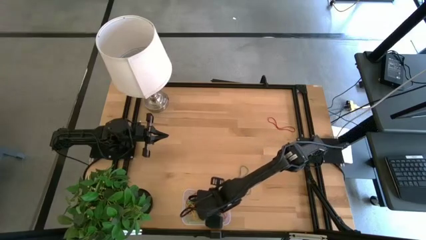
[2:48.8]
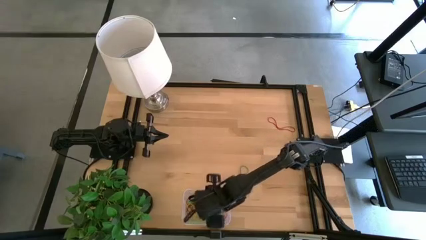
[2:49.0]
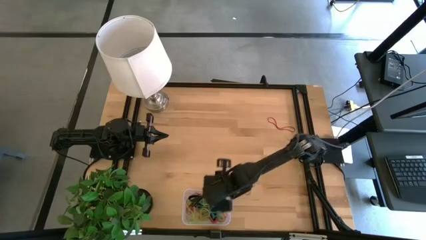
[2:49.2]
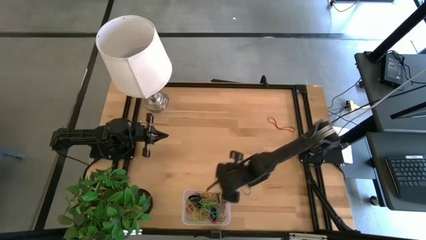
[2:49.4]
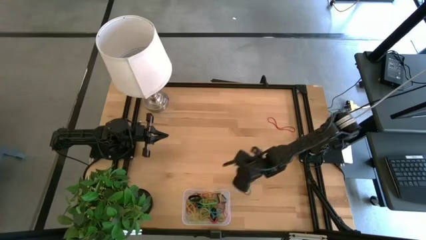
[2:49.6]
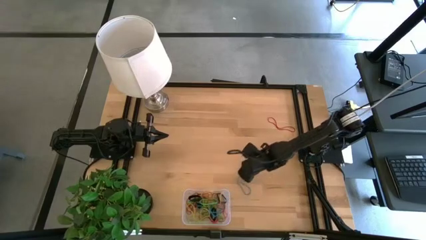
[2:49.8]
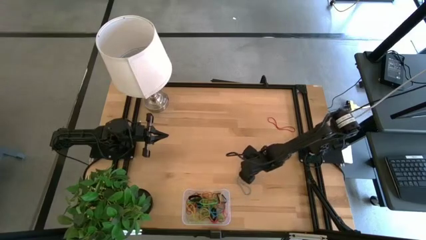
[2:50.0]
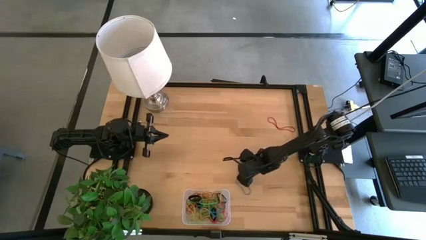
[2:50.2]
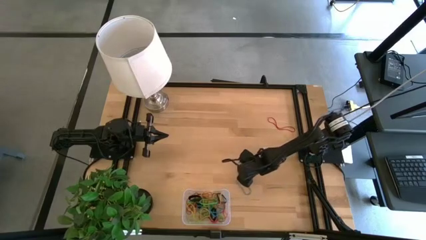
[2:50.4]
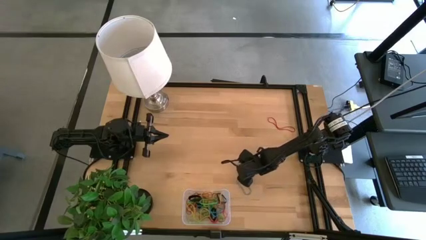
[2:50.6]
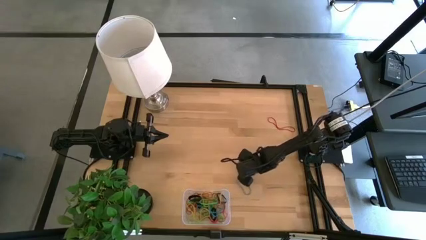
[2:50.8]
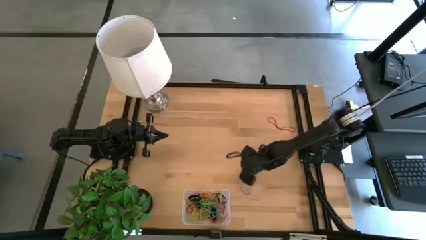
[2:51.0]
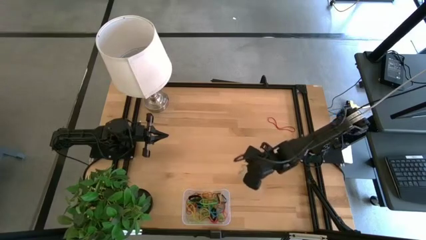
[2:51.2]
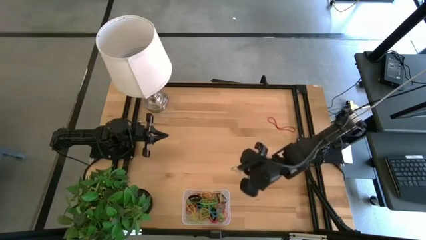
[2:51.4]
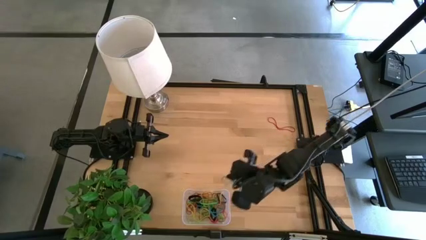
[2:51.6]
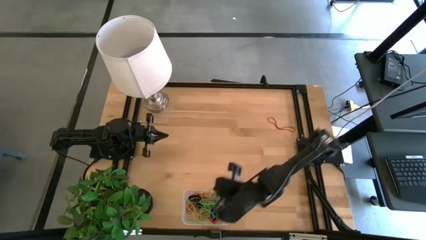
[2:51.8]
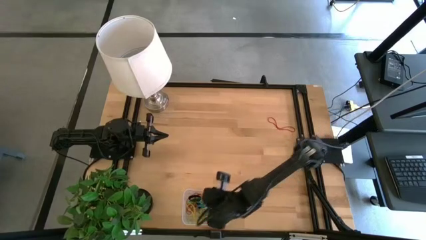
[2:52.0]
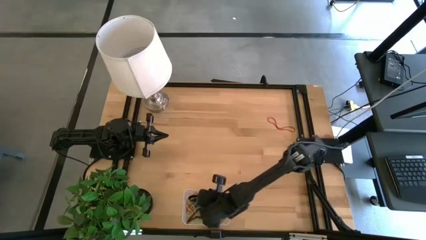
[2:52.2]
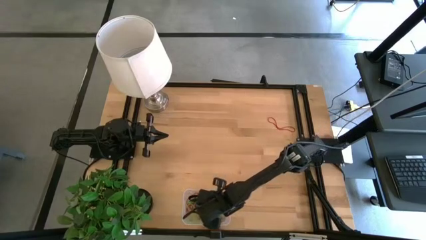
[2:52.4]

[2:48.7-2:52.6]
Task: Pick and place rubber bands into bin
Put the blue rubber band into the transparent bin

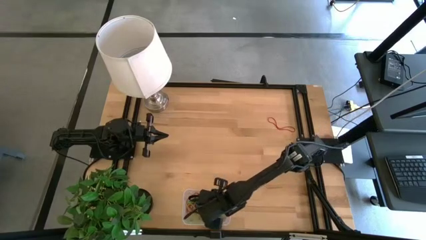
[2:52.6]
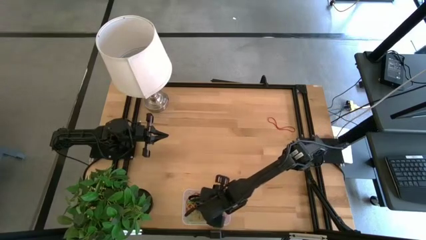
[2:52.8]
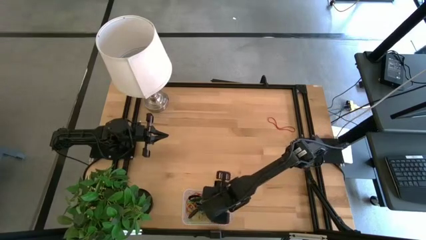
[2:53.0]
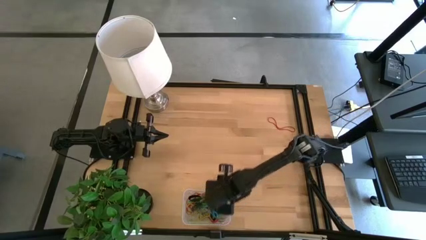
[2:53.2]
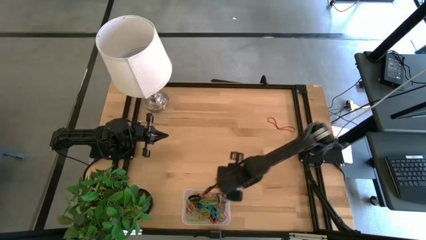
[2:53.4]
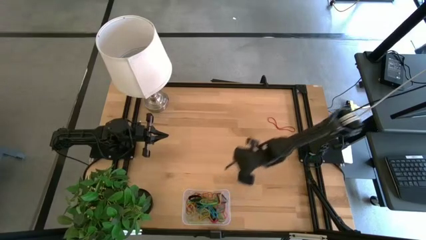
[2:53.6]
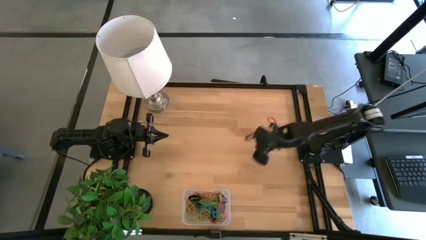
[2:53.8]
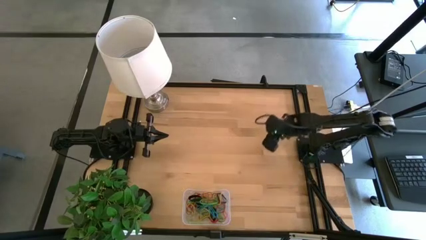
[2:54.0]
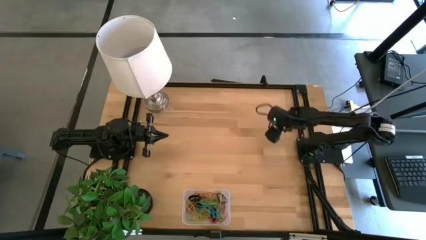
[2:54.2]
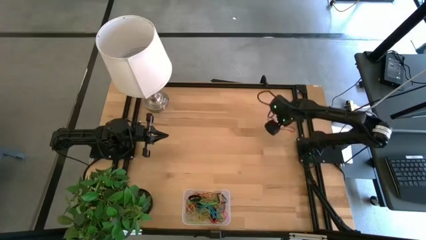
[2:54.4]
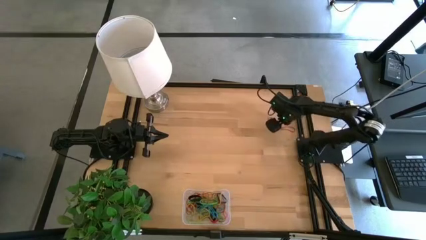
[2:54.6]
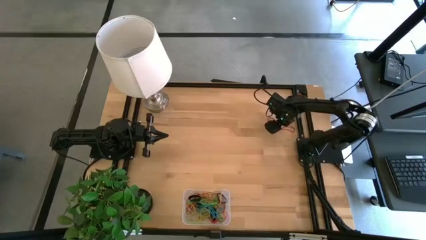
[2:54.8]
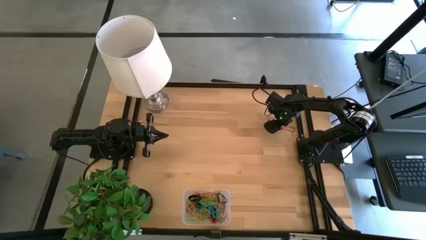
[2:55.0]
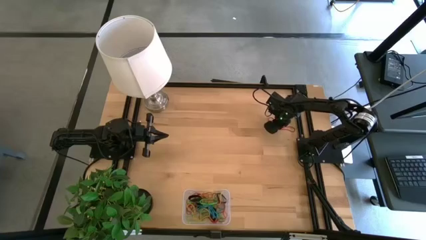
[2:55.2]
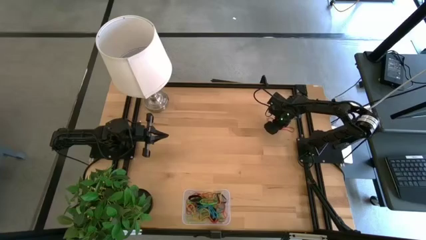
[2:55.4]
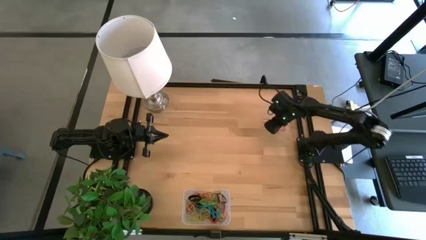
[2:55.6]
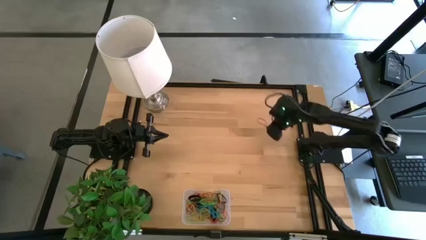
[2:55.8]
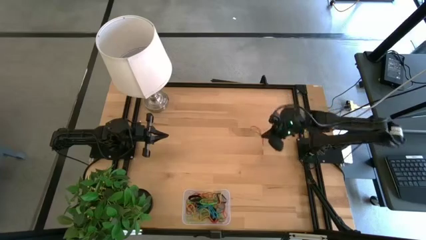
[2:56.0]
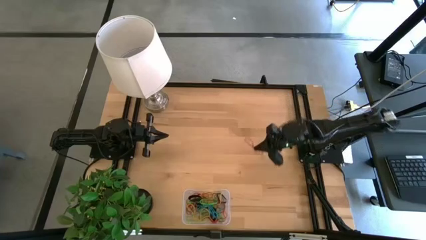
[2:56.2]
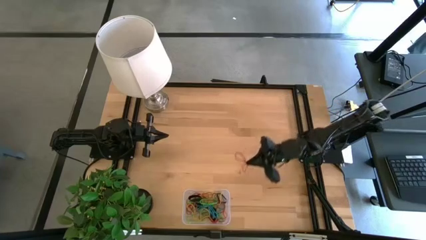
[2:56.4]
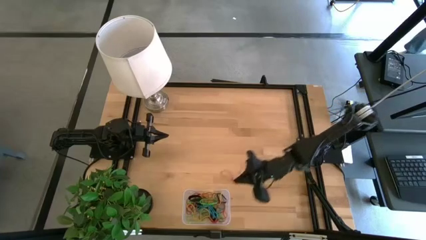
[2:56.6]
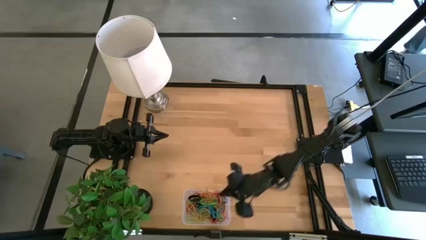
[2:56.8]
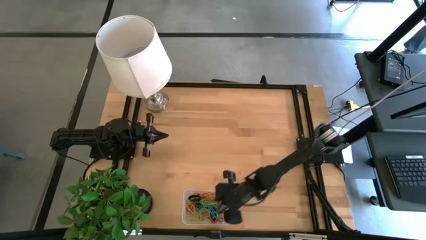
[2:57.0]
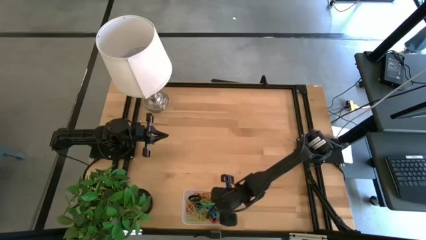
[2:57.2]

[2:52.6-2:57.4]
Put the red rubber band into the transparent bin

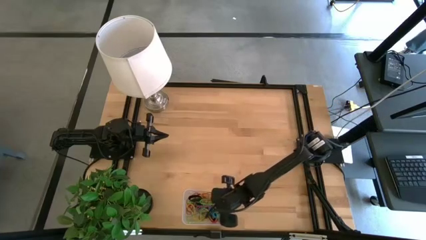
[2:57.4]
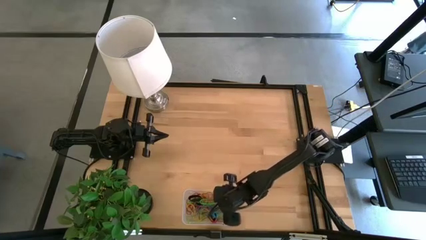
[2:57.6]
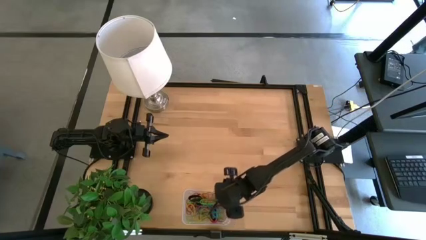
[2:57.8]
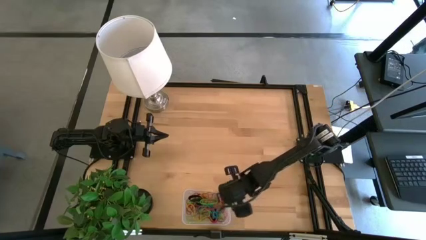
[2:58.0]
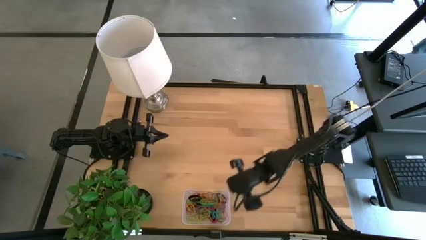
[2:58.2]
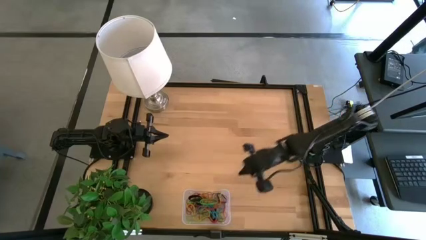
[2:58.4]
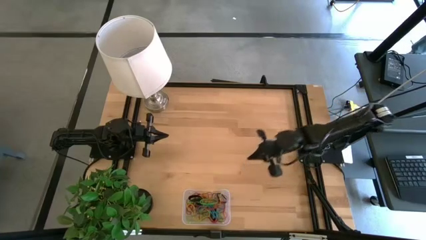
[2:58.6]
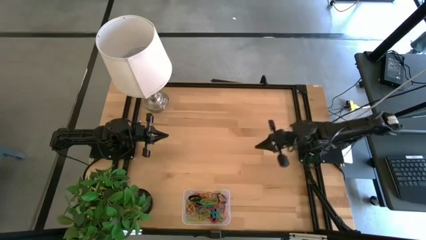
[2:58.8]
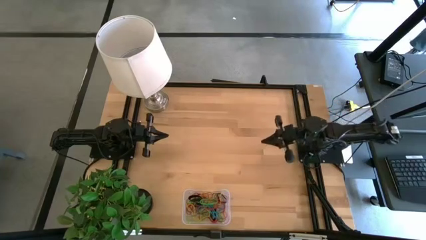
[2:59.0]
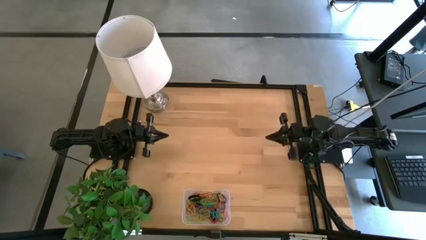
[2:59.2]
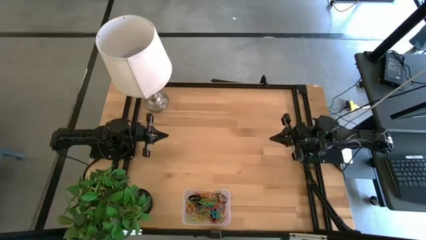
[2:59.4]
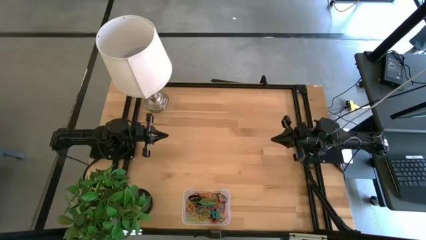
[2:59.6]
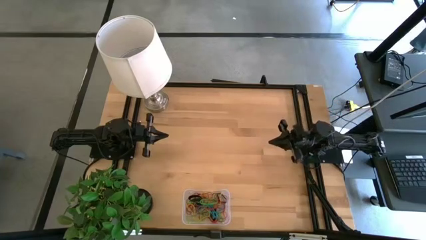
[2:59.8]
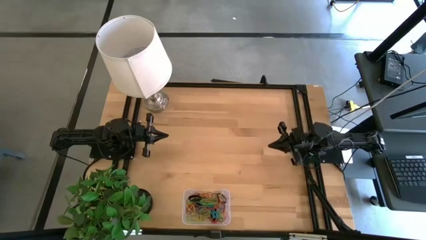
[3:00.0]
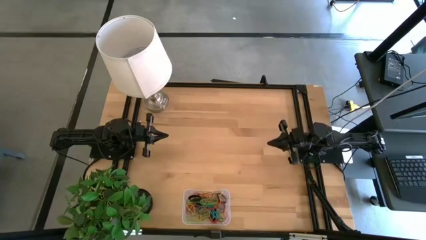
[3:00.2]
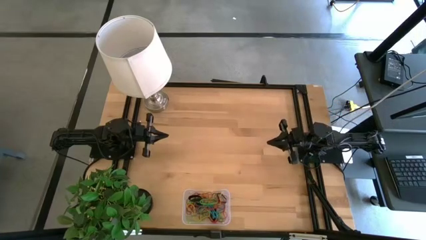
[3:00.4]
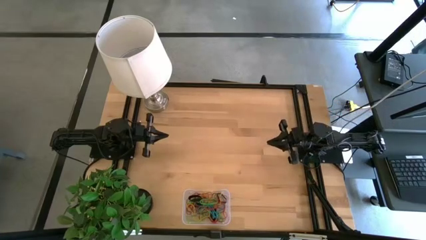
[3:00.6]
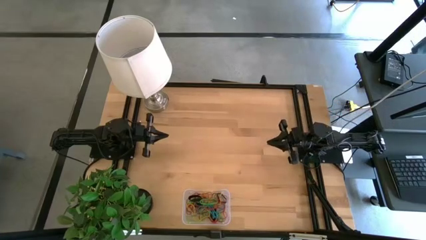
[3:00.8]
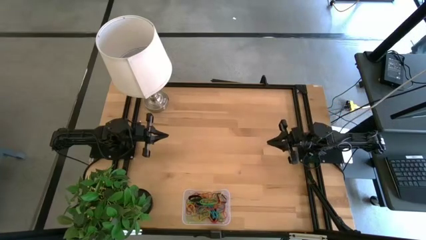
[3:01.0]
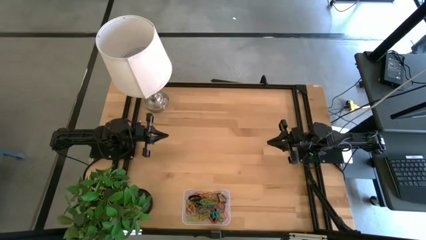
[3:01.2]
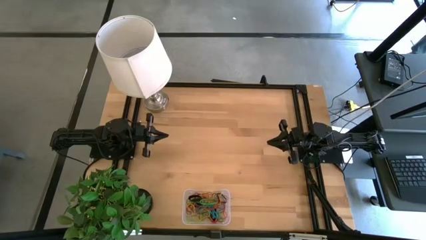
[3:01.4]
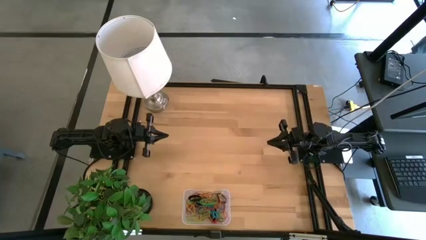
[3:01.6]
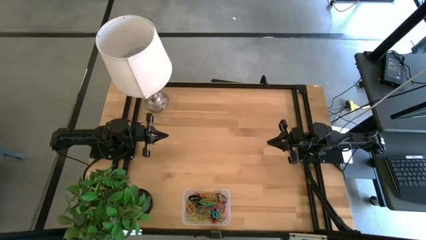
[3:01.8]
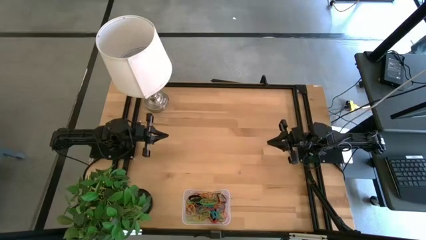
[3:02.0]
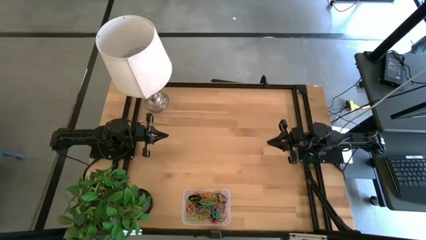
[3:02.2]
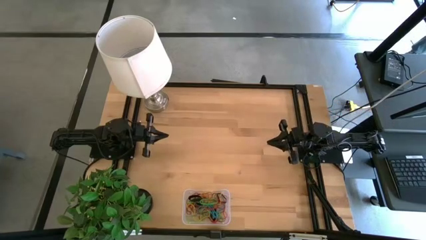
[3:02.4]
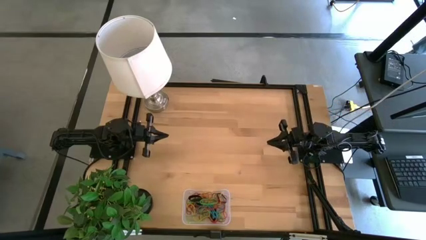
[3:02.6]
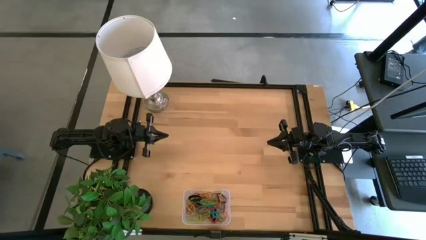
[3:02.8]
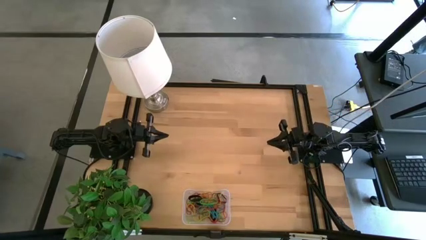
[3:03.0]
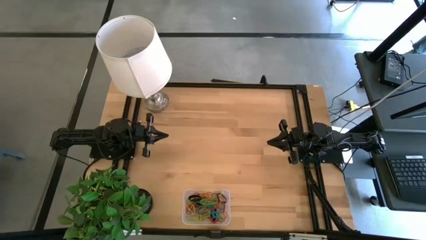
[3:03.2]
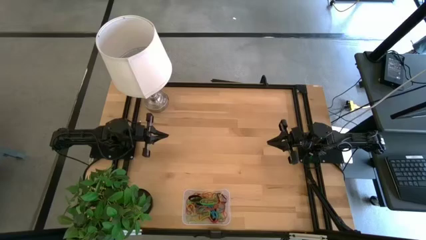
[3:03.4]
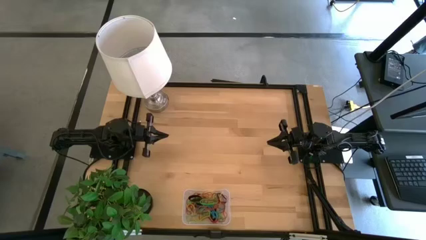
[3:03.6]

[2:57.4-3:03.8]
Return to Home Position
